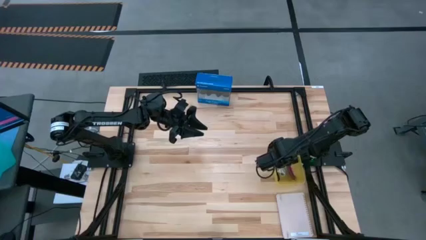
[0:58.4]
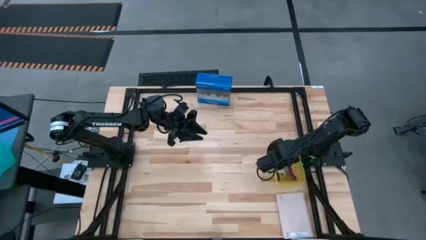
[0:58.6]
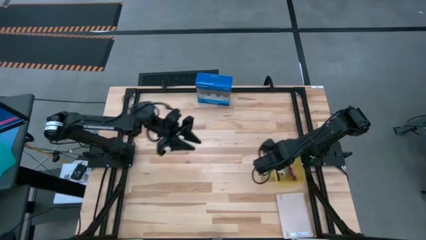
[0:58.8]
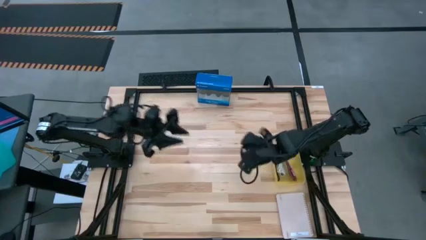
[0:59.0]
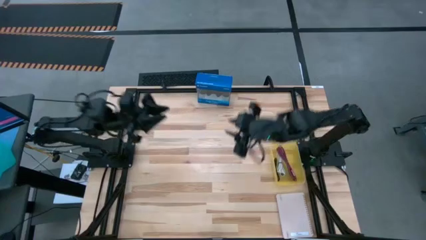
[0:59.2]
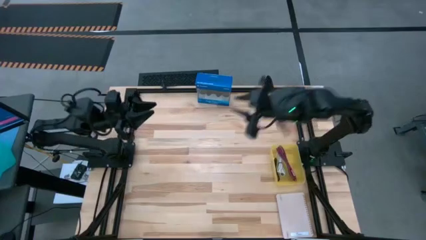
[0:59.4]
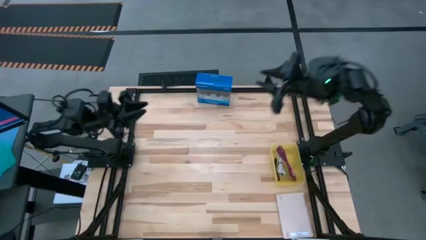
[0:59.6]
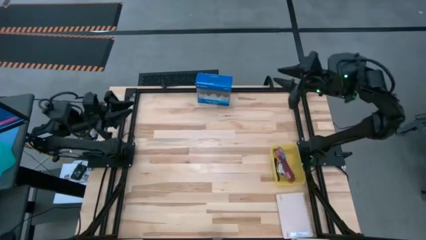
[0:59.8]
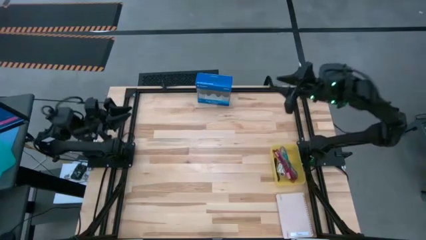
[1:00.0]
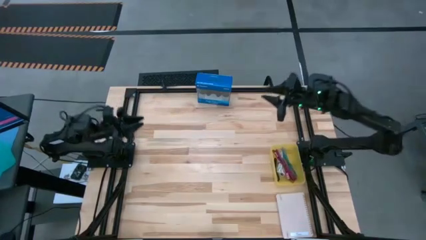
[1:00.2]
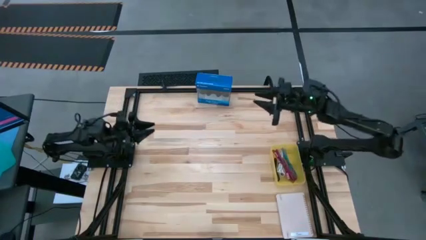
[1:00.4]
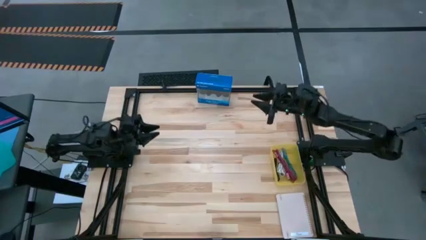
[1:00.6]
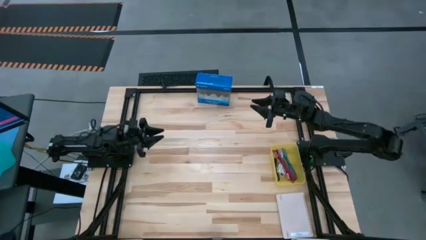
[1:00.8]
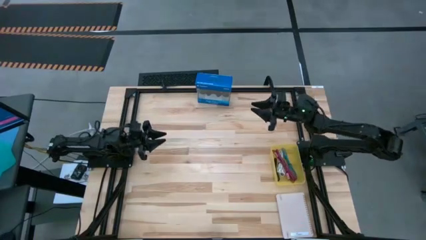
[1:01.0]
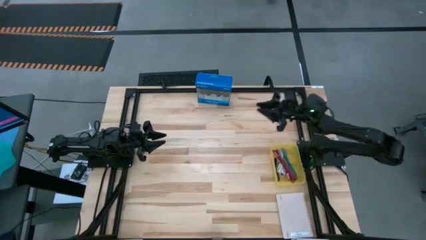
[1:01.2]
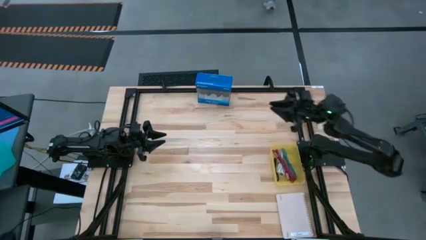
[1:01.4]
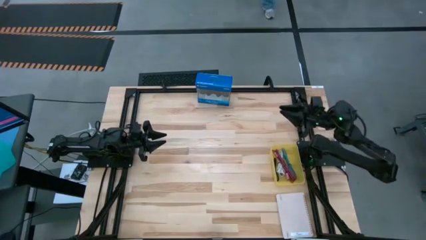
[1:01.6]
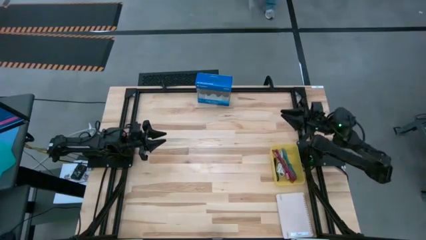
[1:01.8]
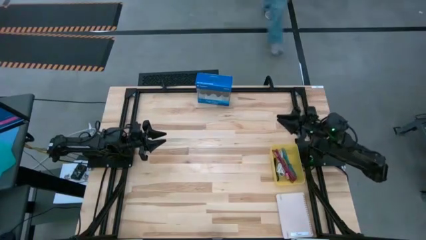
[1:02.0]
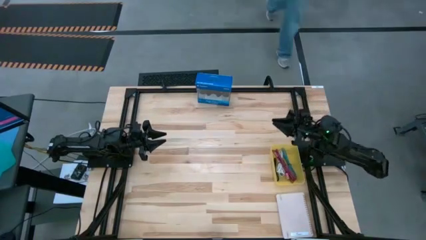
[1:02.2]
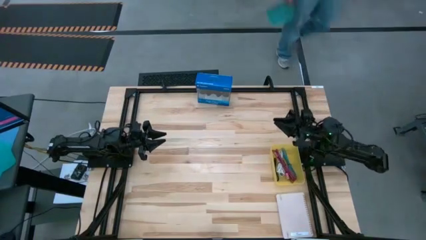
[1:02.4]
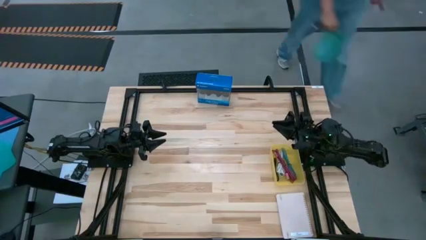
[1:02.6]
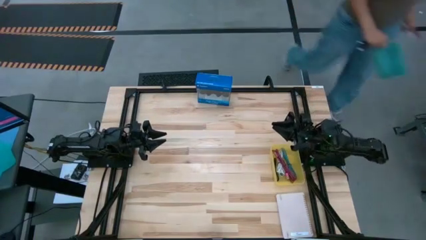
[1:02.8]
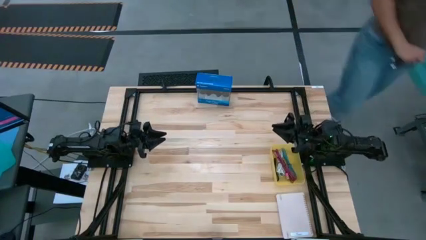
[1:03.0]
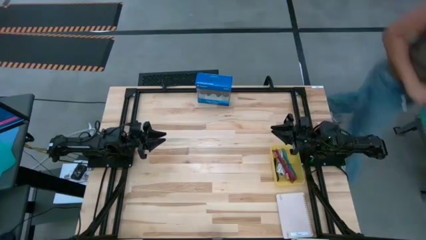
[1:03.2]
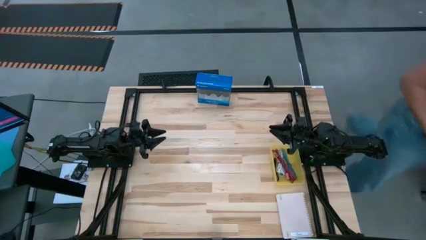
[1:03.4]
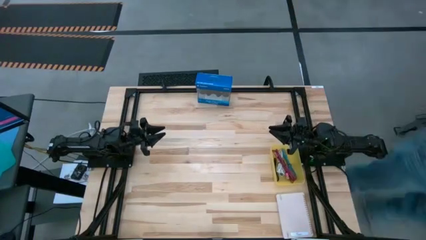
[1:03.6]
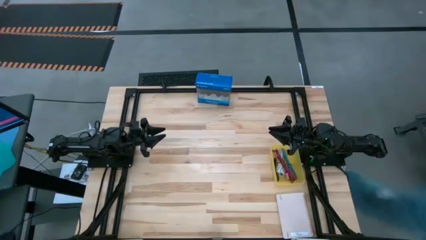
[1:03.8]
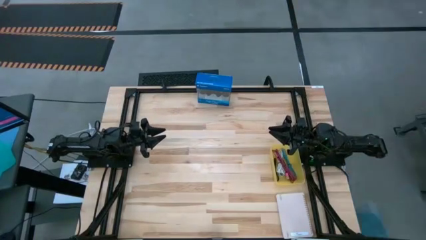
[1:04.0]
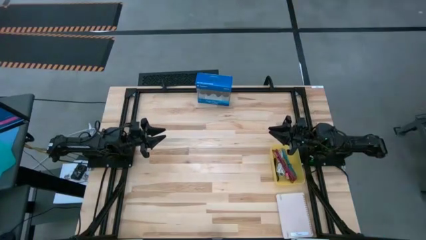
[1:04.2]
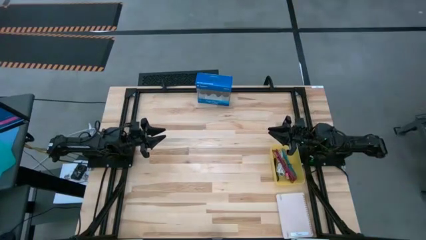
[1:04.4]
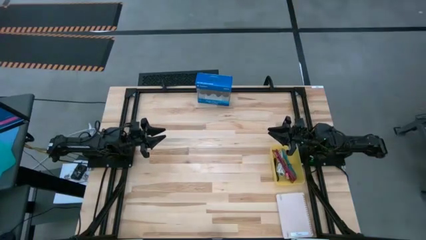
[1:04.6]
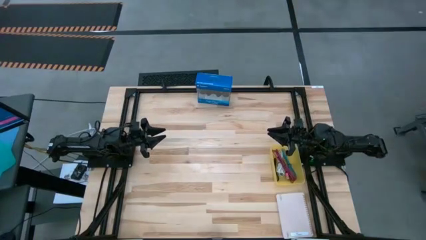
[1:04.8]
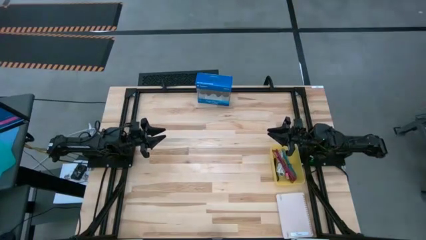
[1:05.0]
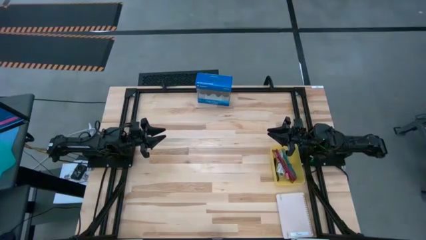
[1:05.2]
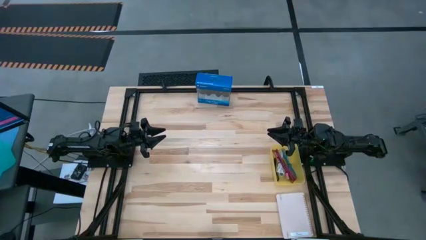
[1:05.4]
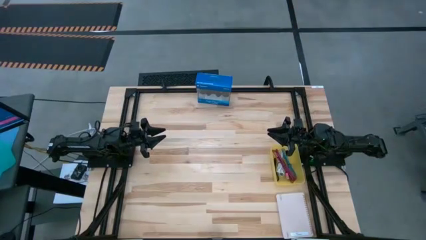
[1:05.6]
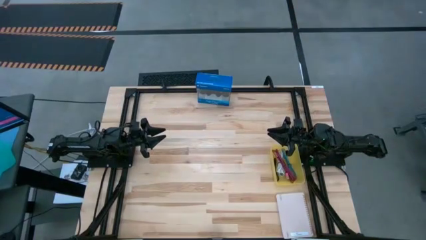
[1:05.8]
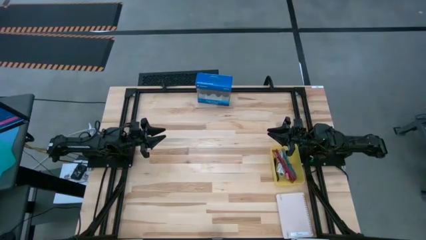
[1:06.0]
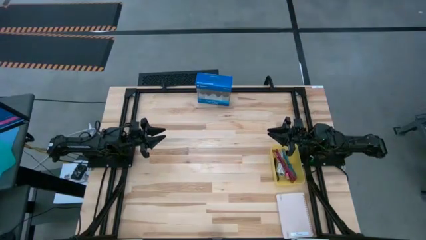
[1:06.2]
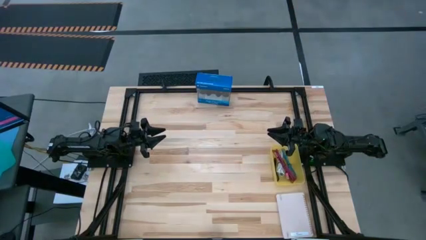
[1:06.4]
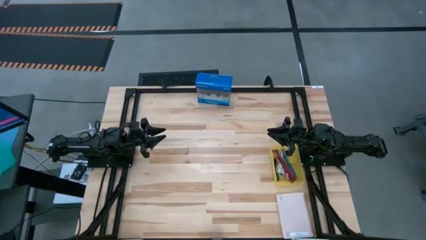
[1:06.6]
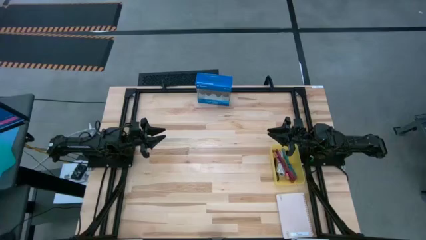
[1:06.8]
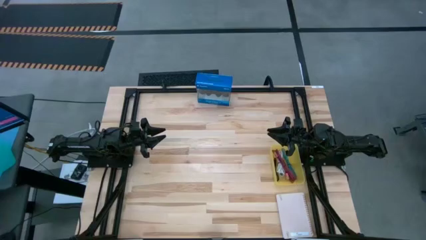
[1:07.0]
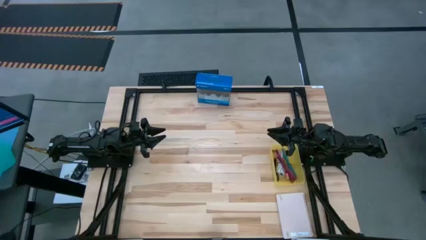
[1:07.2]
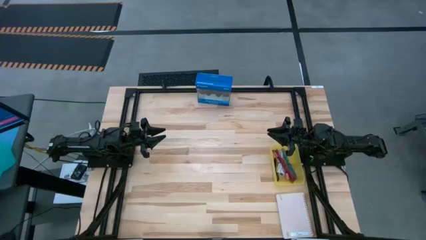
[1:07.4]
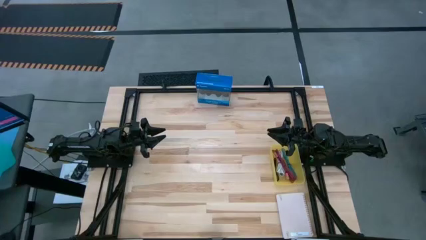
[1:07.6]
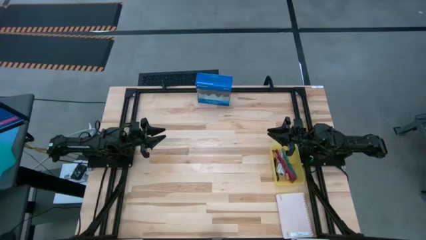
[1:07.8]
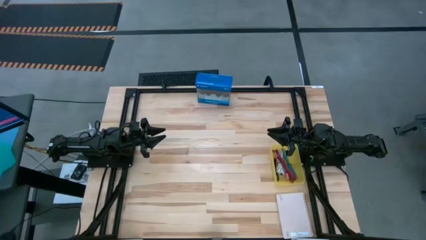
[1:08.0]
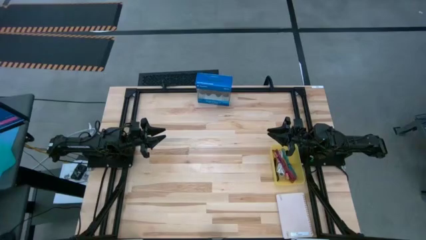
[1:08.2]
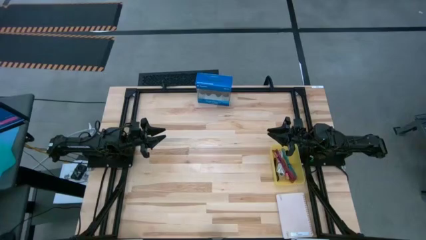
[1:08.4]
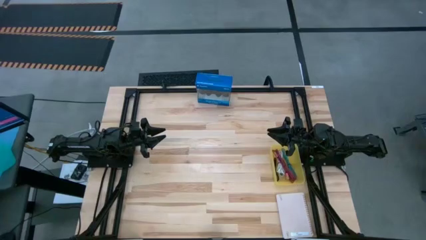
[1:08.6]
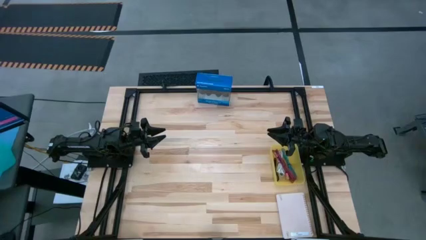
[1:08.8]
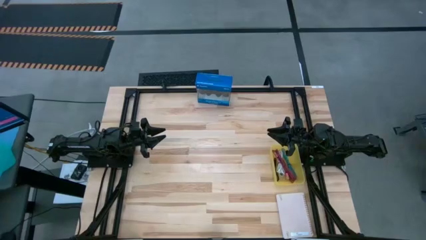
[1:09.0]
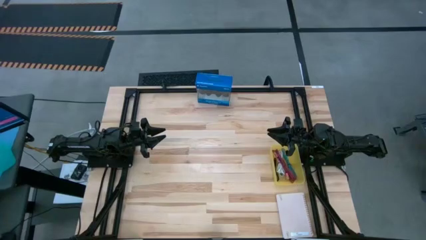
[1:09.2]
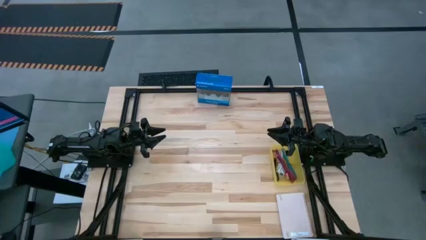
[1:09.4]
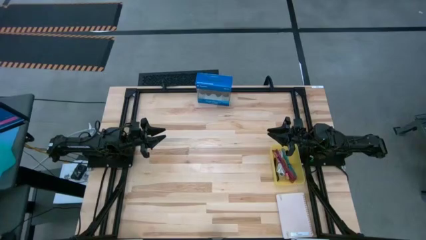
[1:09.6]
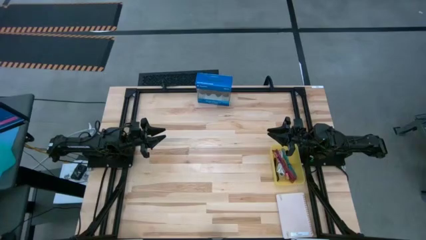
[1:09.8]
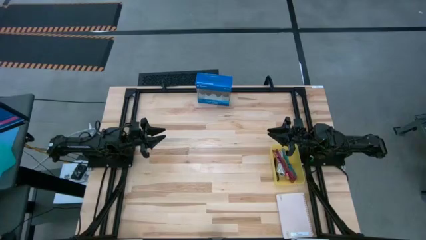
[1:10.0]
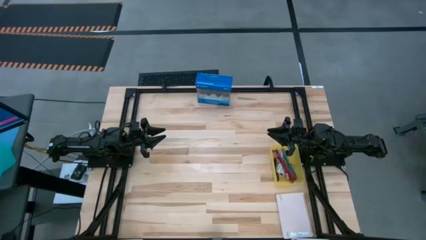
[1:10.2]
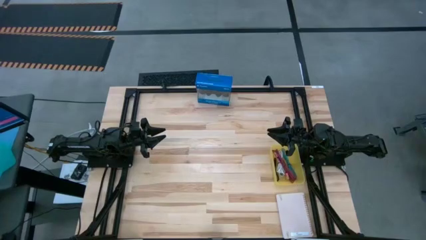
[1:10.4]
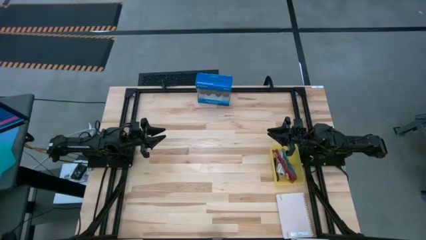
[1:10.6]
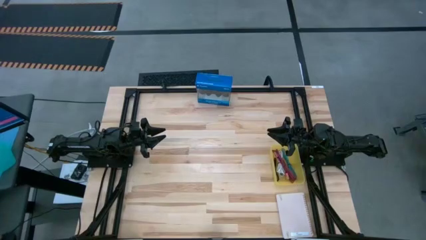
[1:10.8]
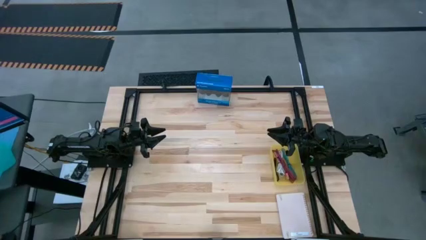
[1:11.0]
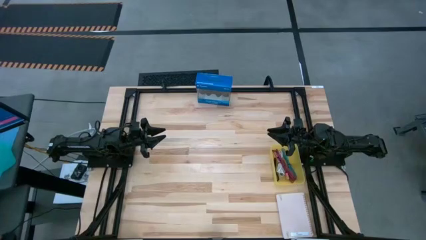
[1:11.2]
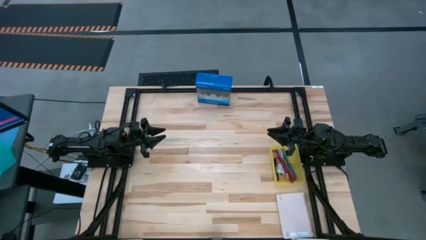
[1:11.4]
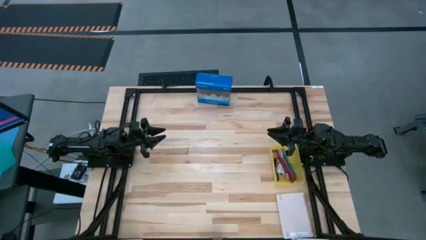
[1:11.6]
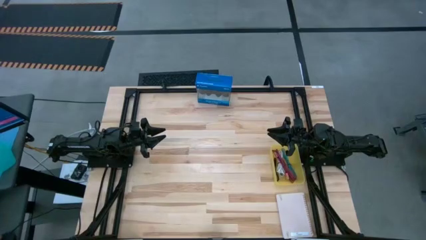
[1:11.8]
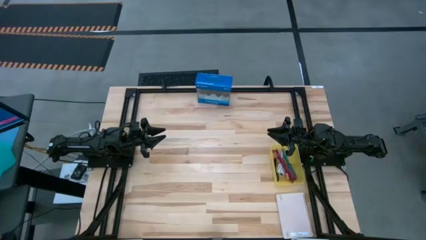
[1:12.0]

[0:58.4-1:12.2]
Task: Pick and place USB-C Cables
Return to Home Position
